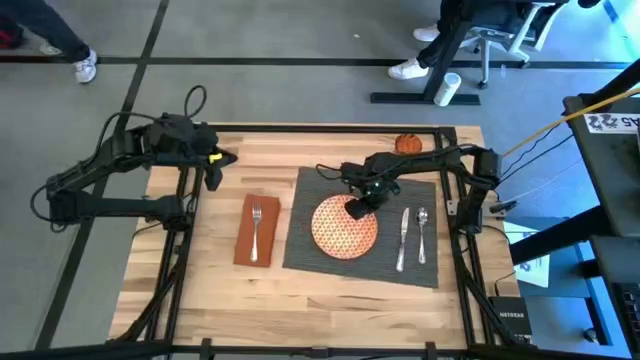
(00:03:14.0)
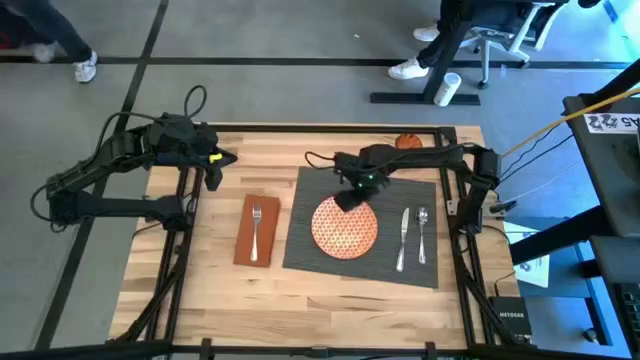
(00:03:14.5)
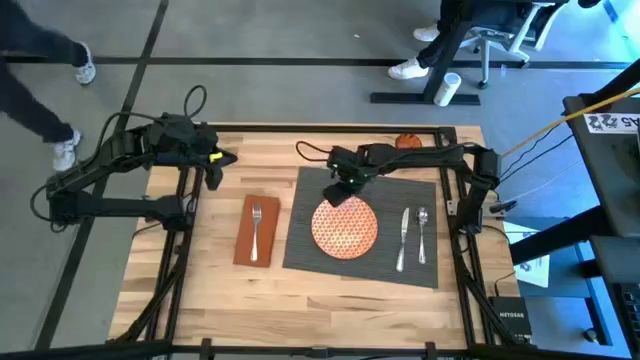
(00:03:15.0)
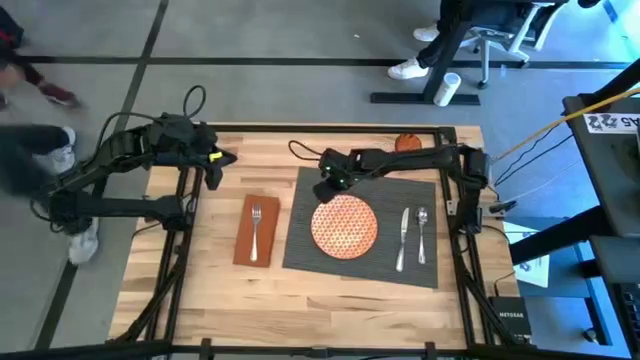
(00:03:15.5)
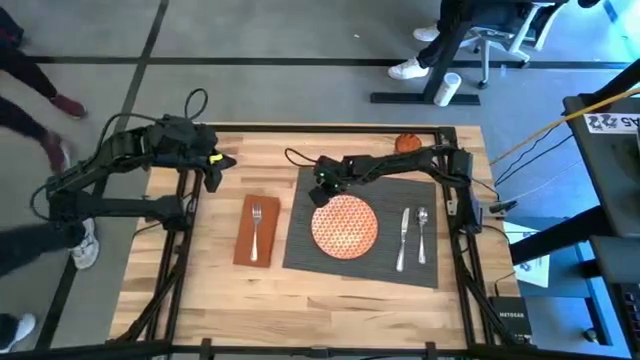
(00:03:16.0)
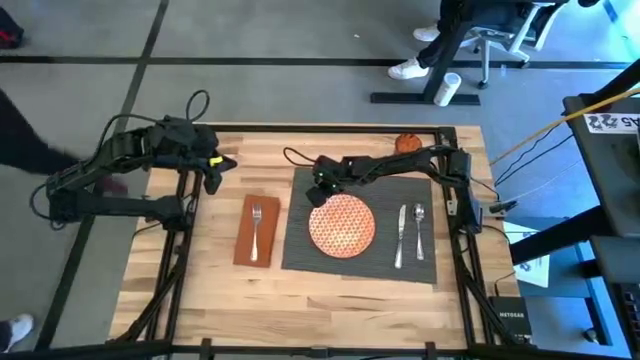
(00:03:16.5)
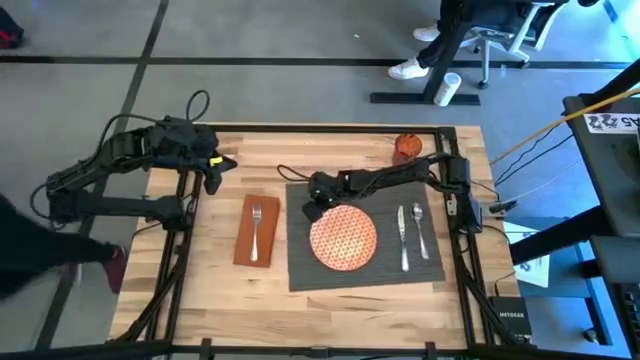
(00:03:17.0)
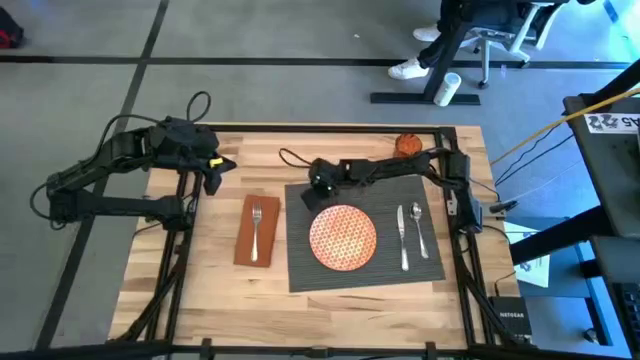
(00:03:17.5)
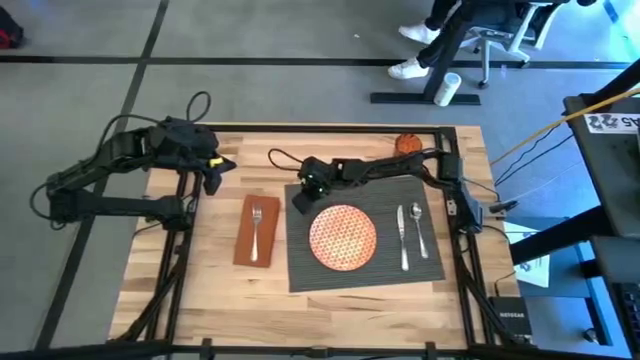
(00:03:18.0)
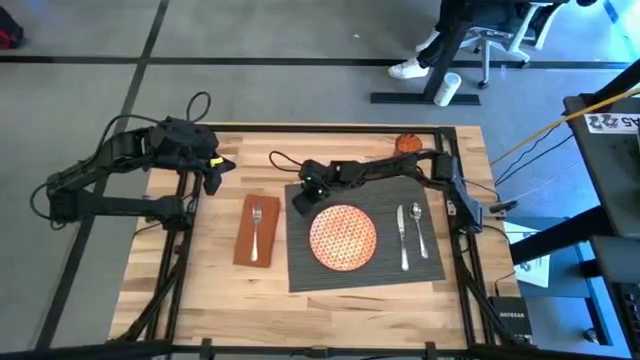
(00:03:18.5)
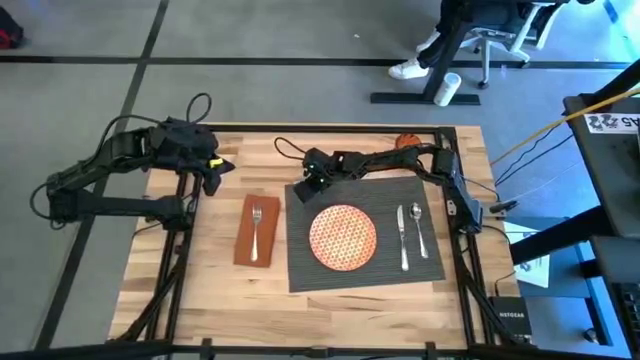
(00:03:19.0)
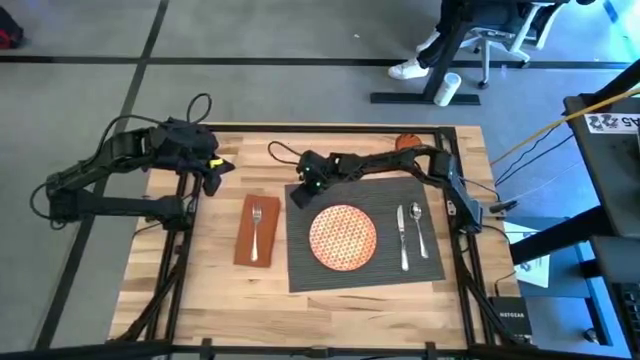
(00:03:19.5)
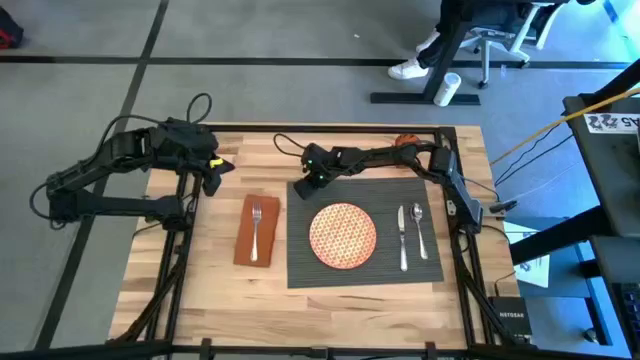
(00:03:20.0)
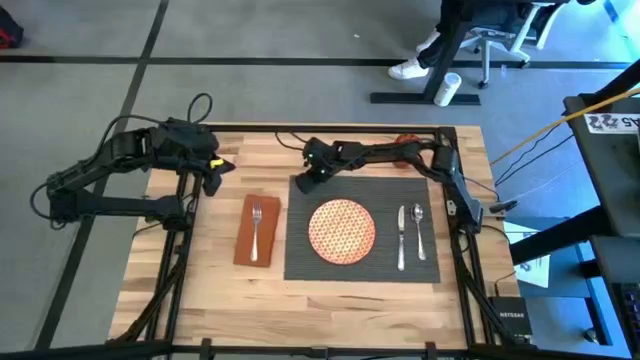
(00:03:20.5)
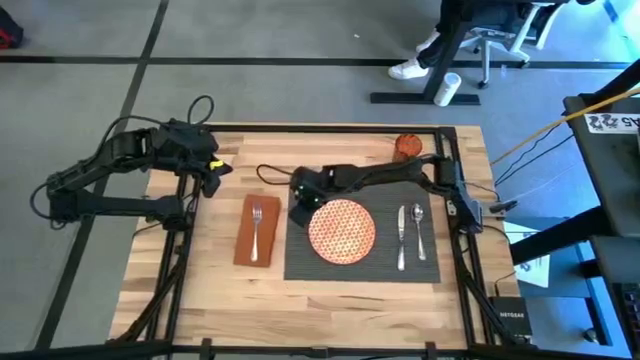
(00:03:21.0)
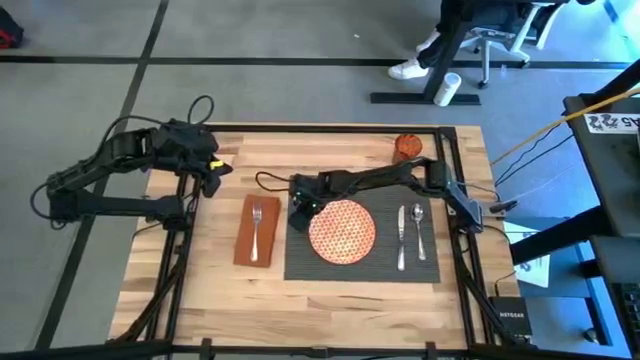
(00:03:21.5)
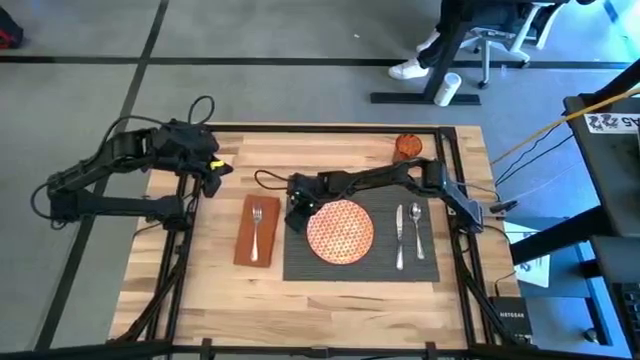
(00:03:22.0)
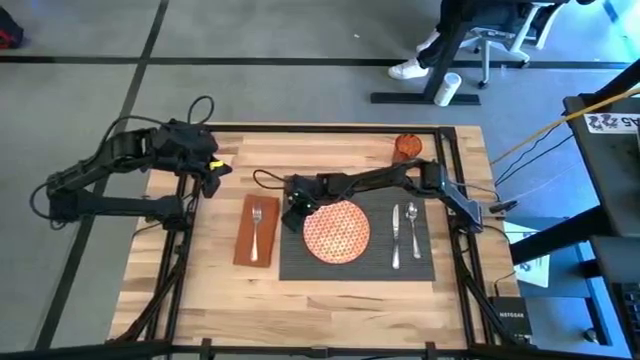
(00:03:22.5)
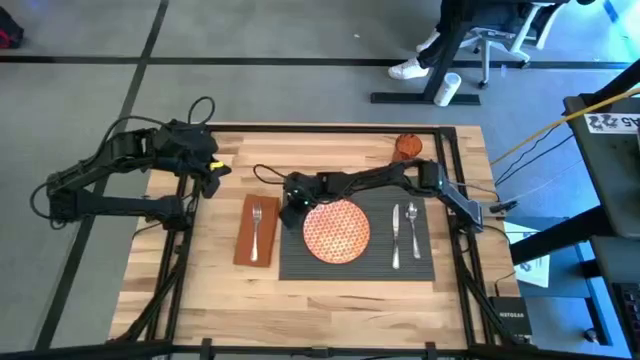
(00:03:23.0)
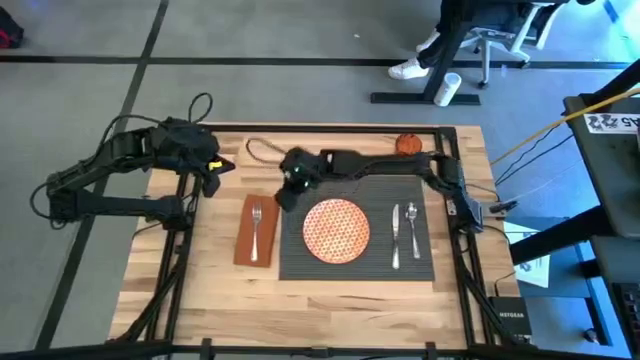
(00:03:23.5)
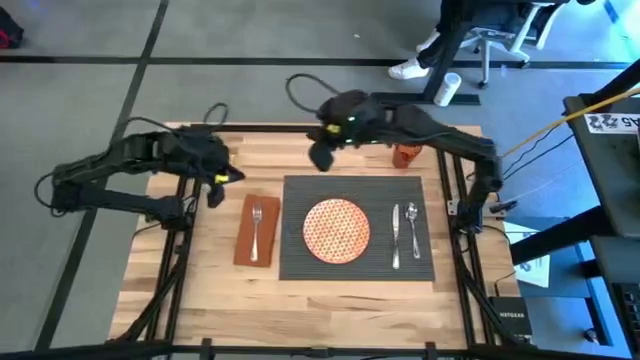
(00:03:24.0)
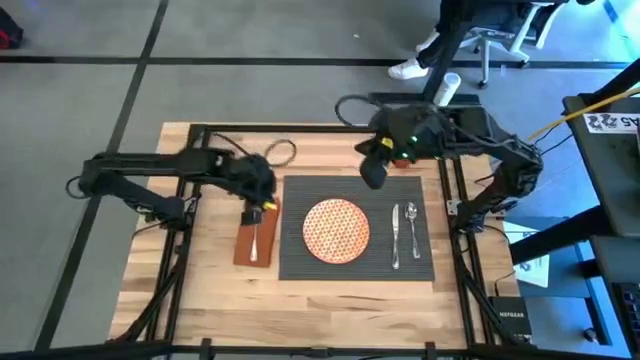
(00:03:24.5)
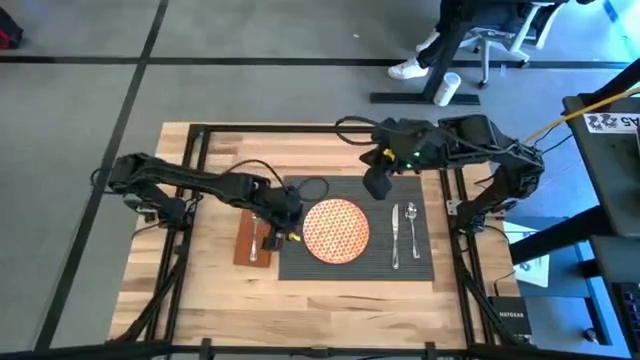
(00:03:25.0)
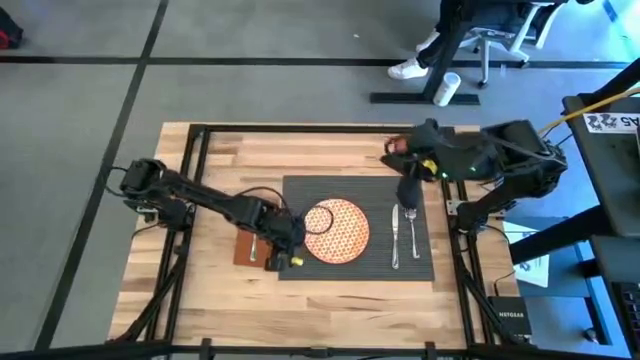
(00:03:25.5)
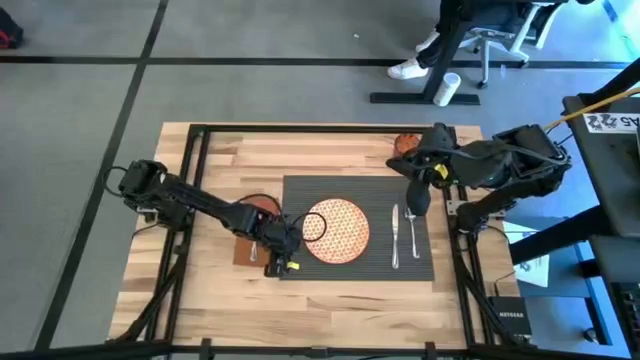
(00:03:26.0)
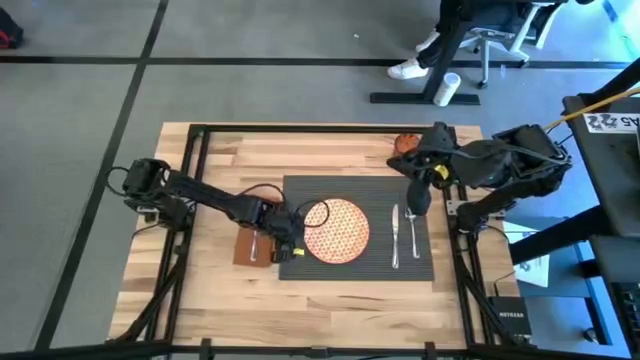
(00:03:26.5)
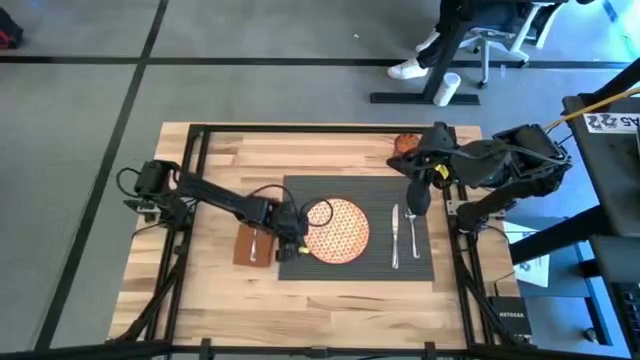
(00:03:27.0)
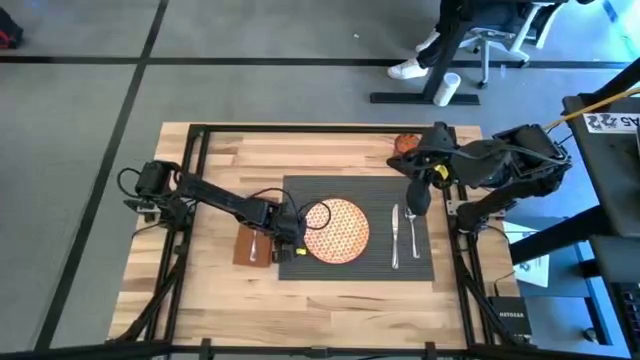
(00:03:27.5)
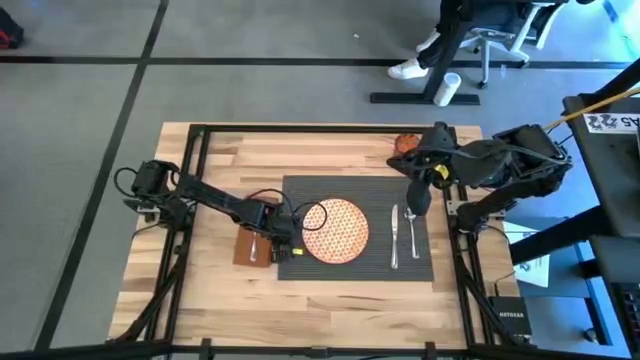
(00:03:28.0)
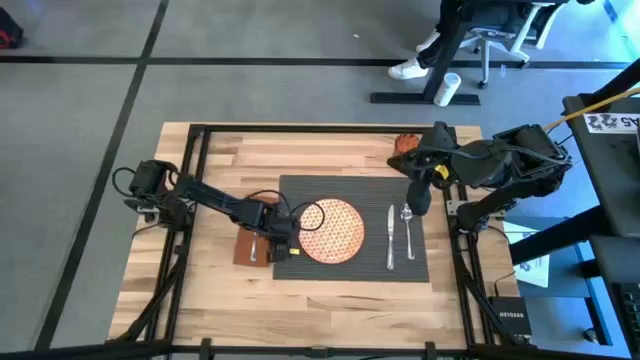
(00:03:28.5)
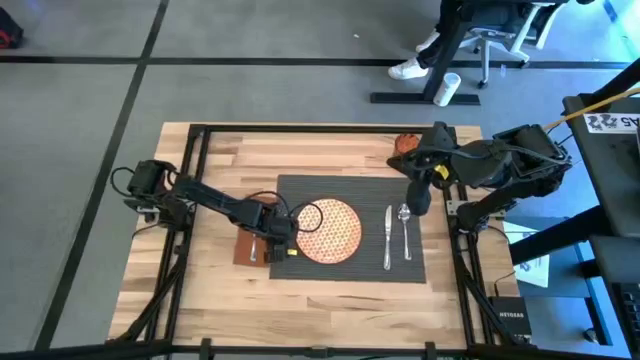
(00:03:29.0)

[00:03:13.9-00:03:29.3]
Task: Set table place
Adjust the gray tablemat

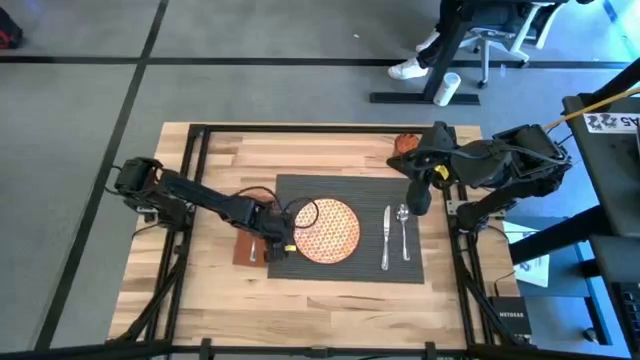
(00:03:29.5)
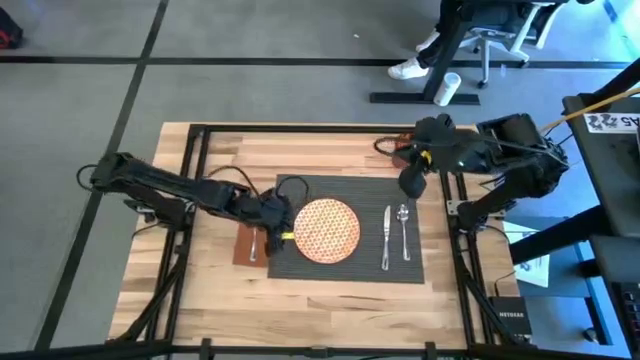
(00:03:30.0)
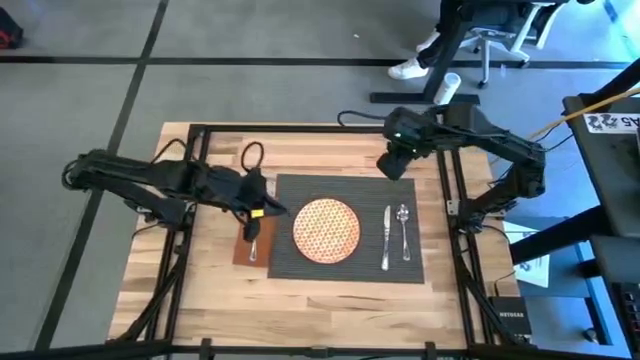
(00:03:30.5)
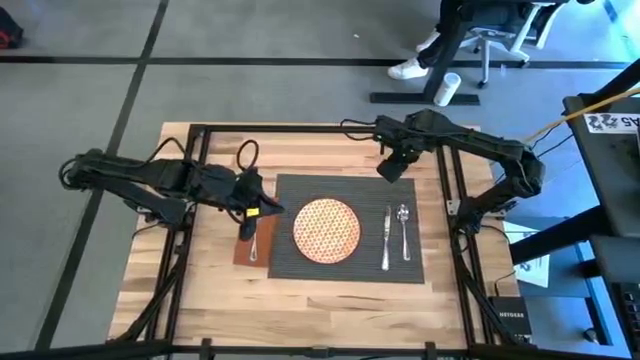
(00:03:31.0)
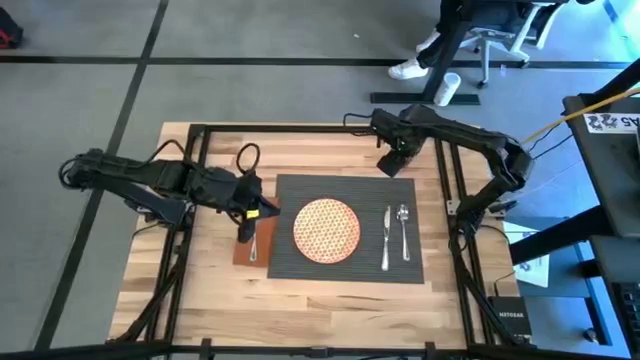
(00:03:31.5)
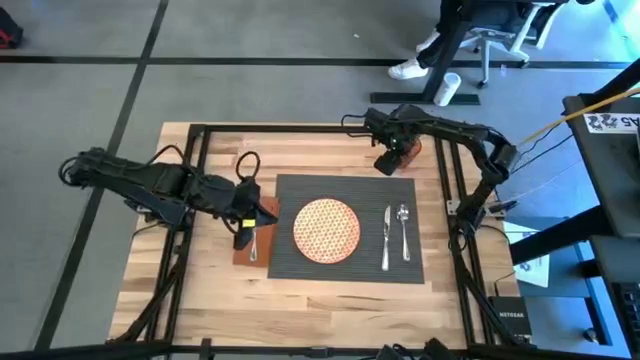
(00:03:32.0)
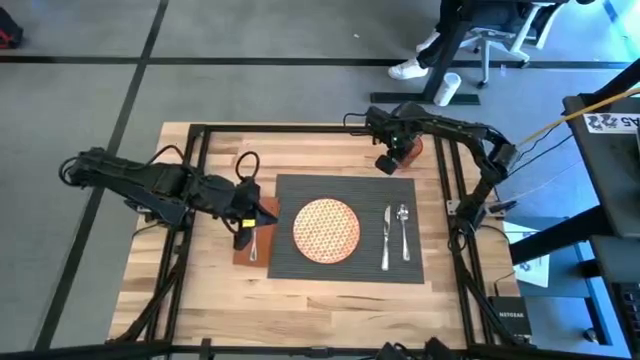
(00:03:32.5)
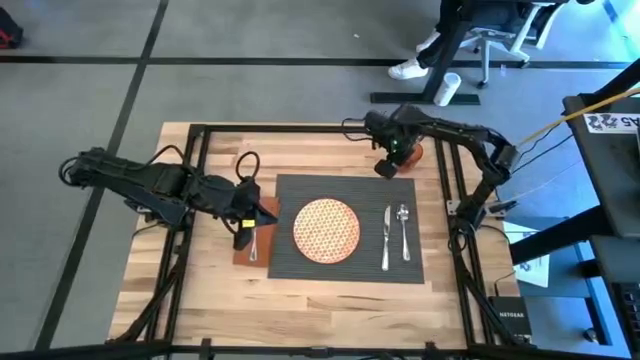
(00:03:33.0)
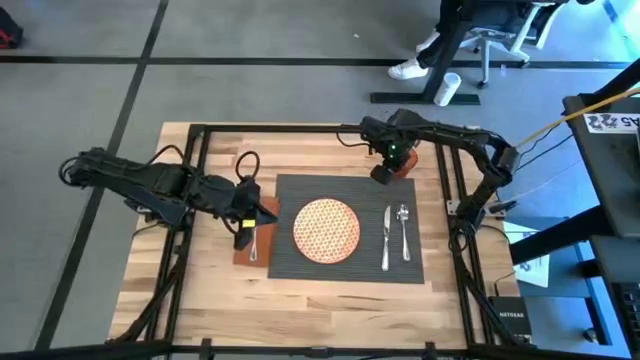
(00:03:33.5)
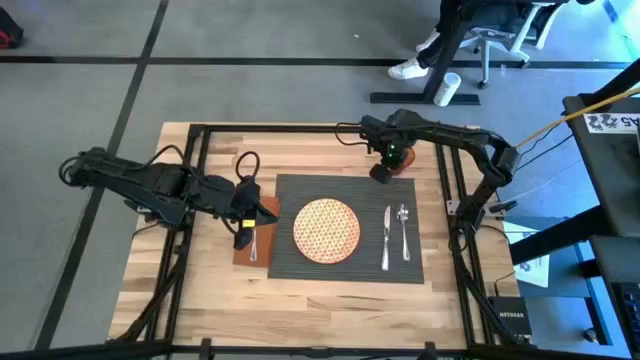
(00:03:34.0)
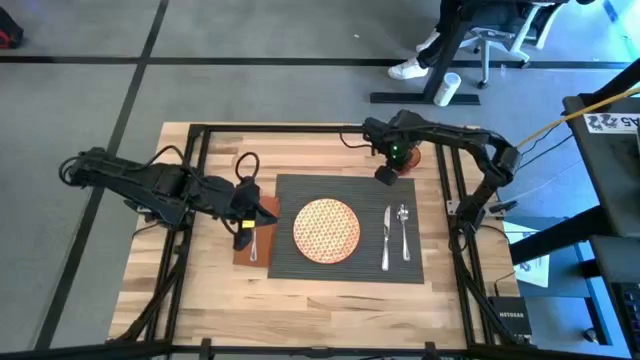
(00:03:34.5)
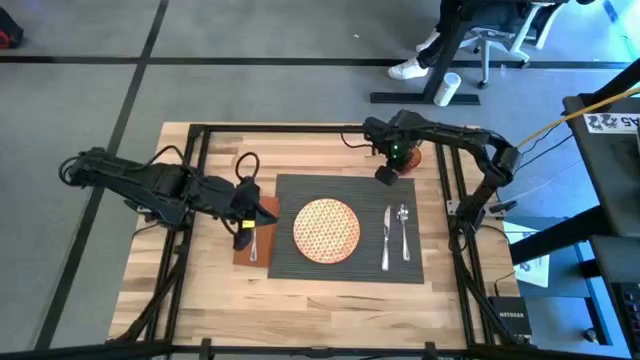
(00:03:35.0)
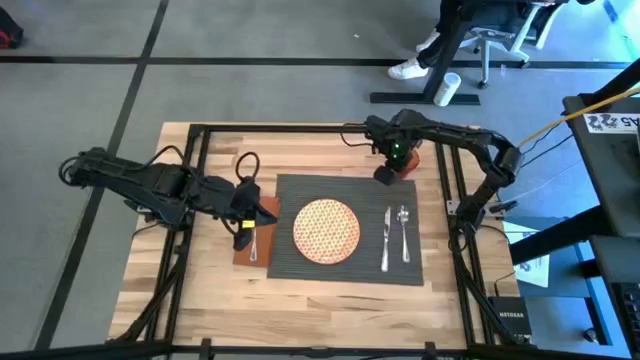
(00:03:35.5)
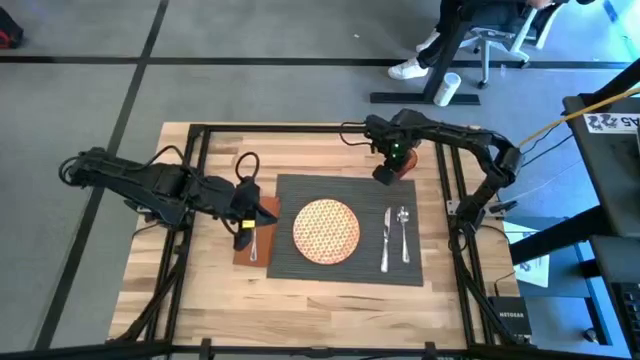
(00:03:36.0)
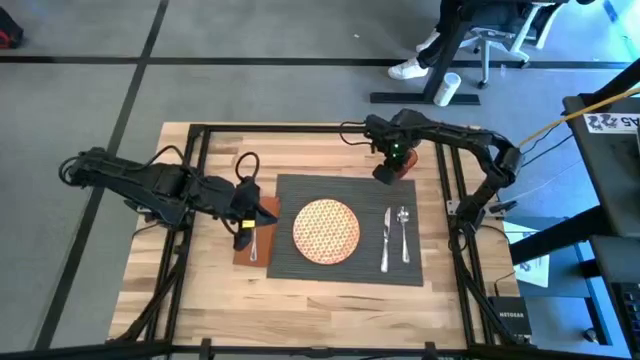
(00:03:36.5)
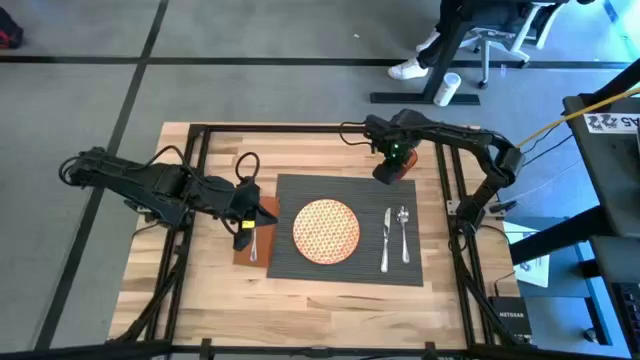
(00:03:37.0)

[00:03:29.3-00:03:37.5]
Adjust the orange glass
